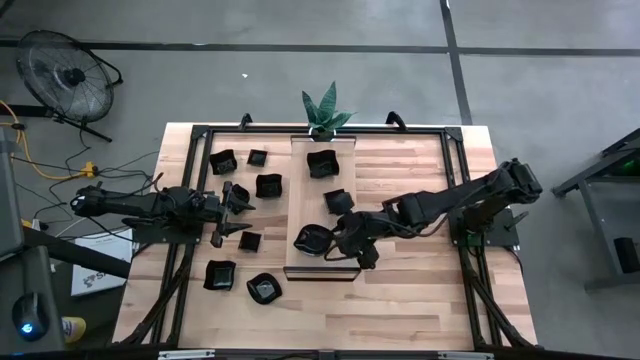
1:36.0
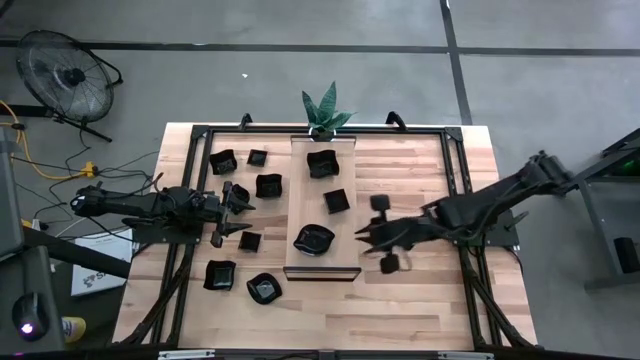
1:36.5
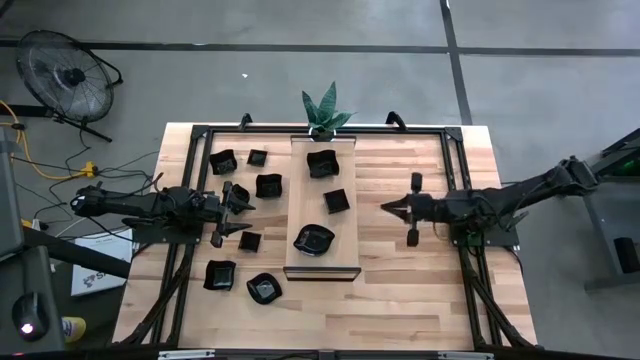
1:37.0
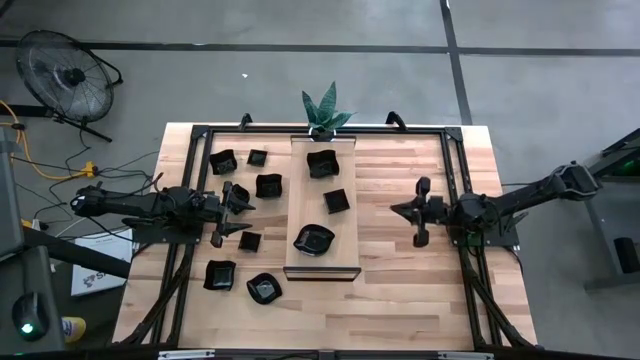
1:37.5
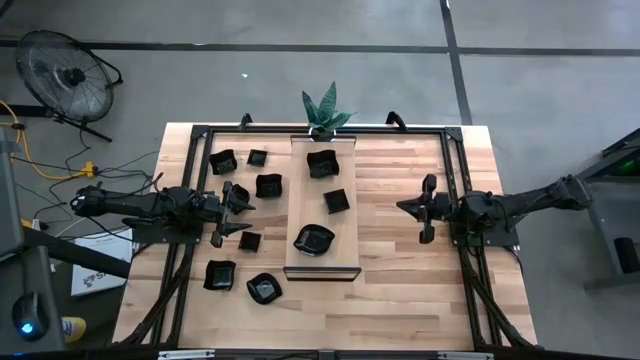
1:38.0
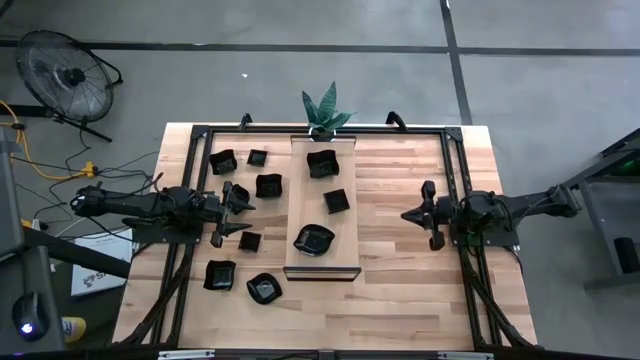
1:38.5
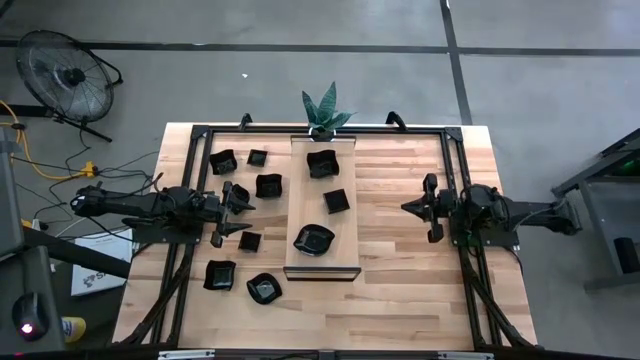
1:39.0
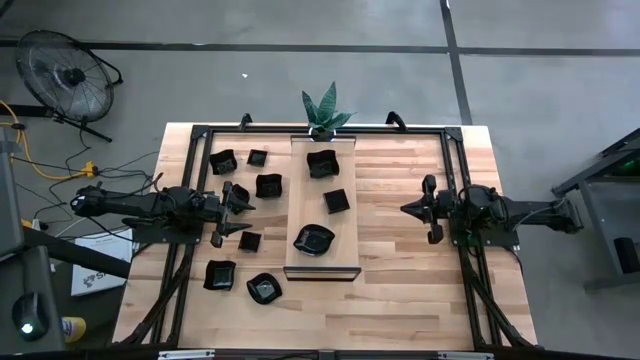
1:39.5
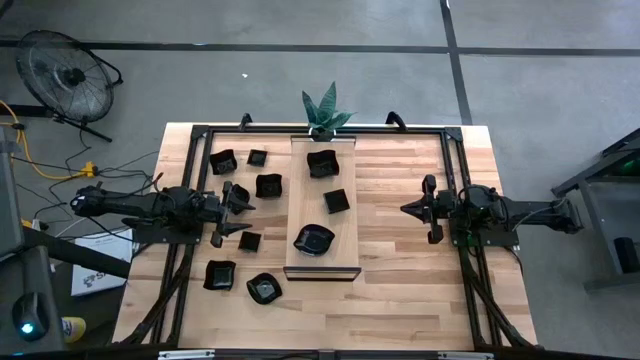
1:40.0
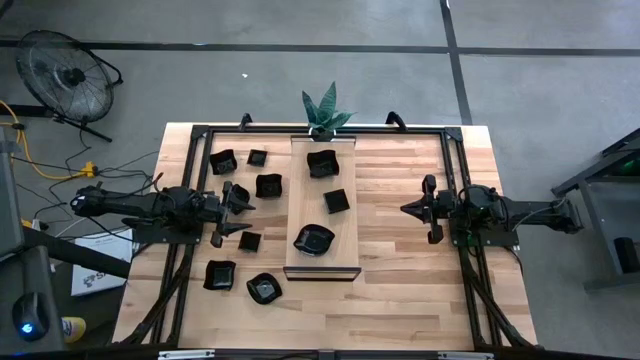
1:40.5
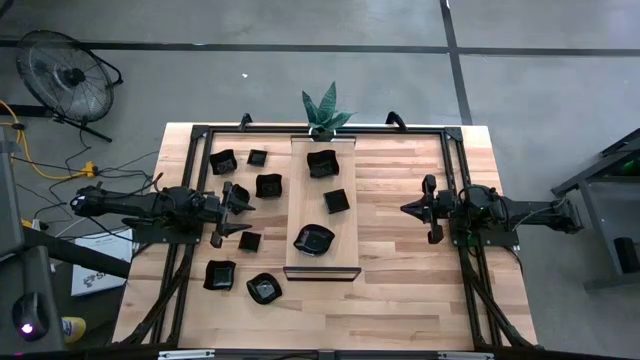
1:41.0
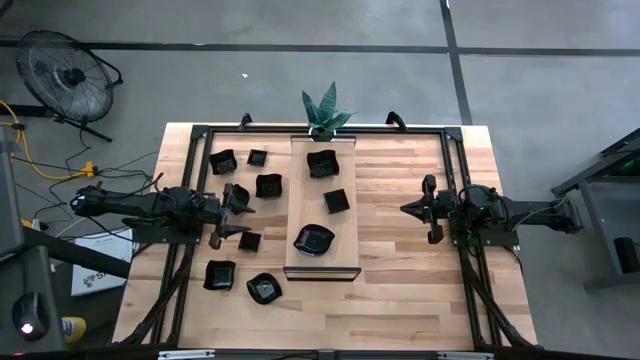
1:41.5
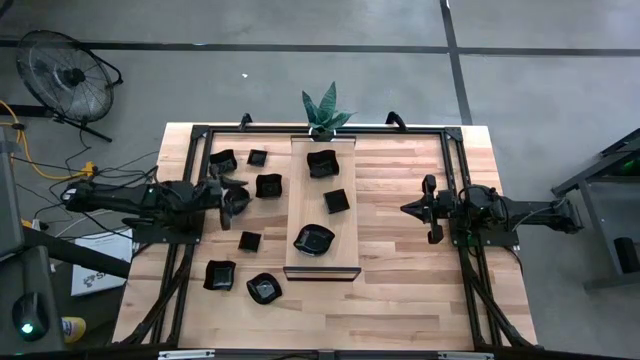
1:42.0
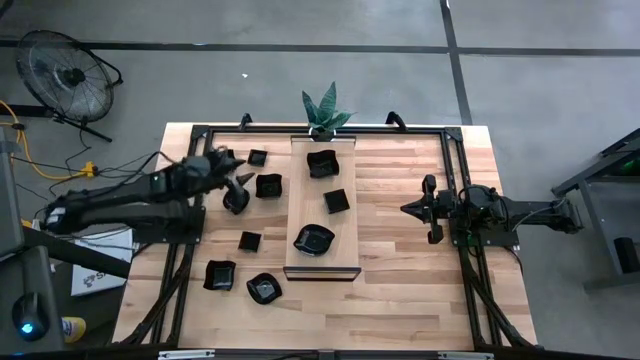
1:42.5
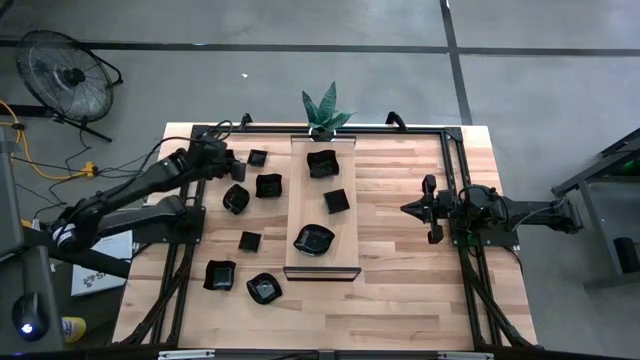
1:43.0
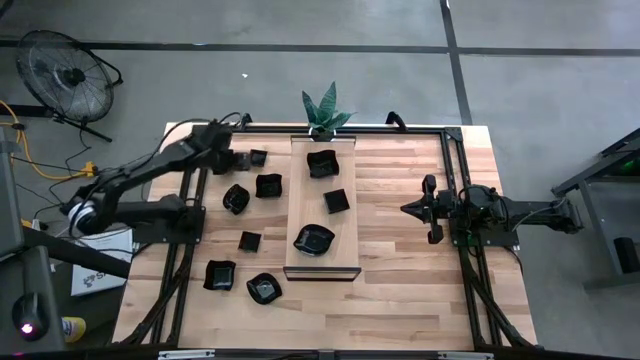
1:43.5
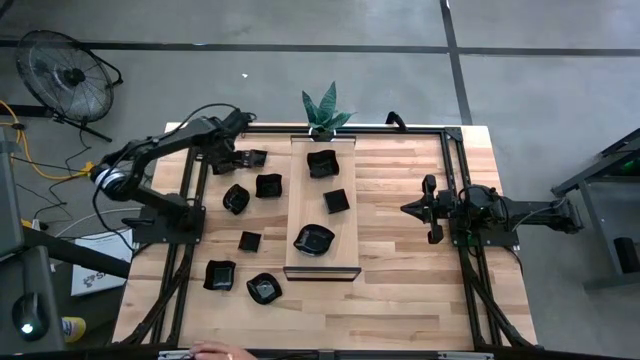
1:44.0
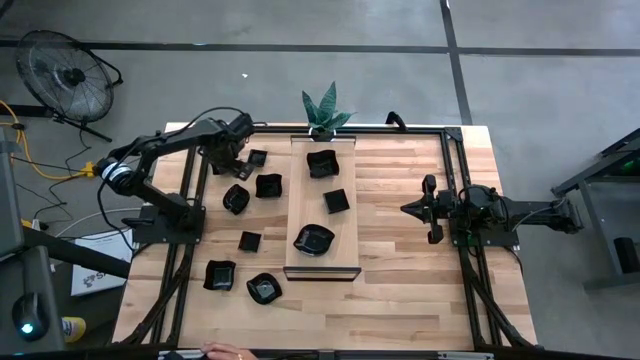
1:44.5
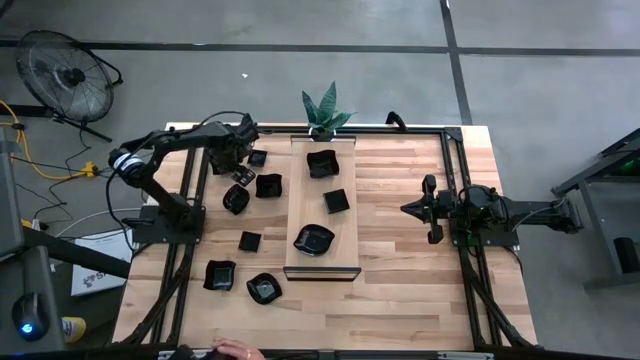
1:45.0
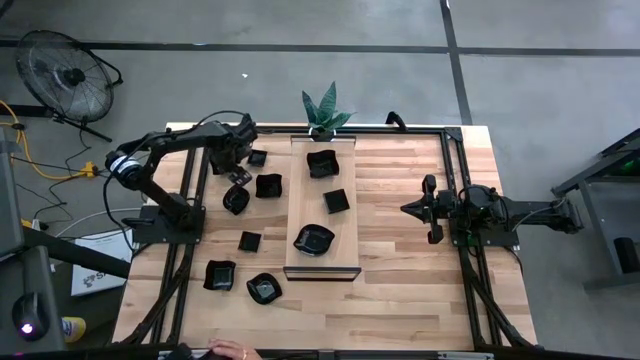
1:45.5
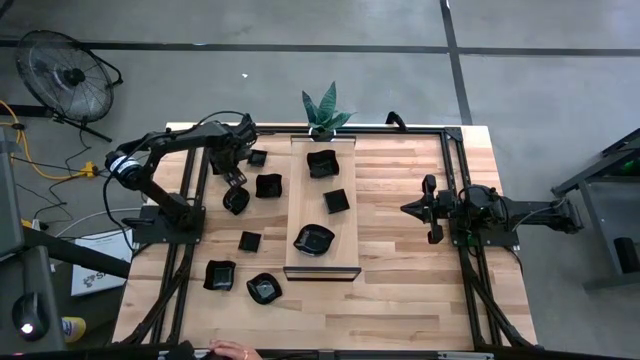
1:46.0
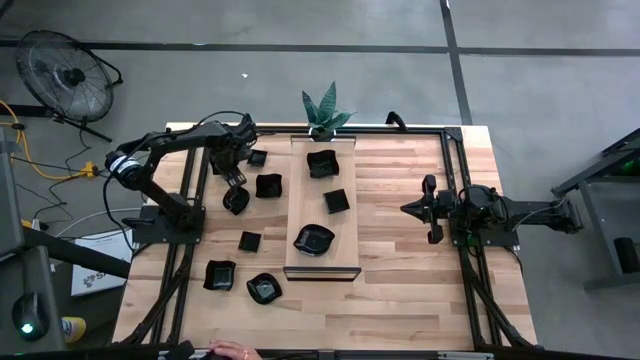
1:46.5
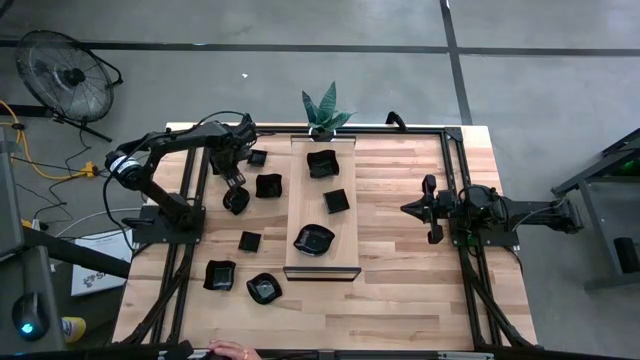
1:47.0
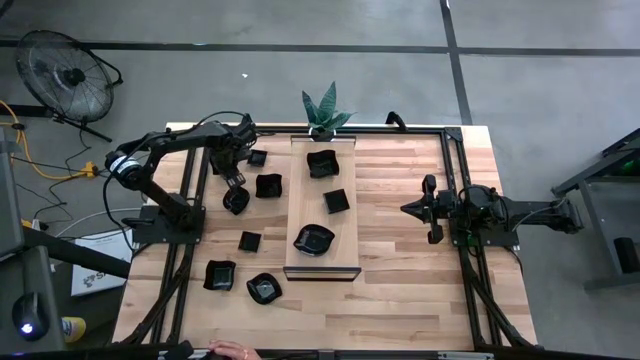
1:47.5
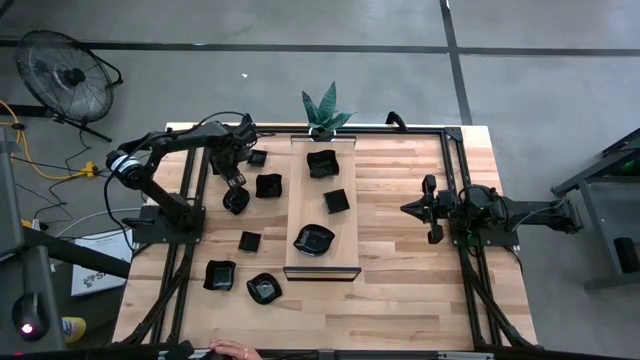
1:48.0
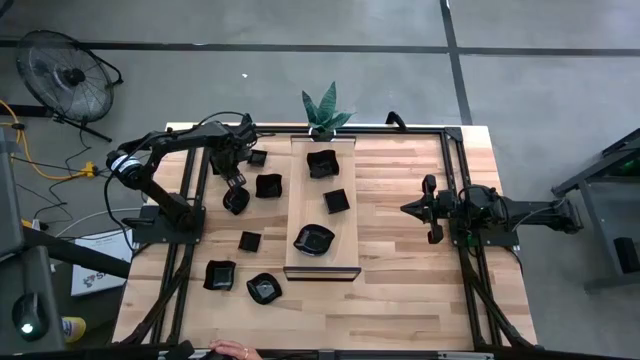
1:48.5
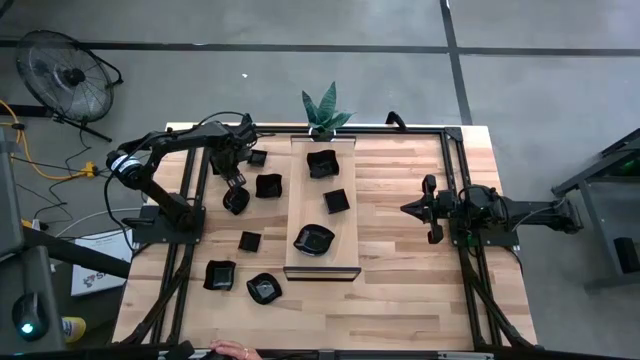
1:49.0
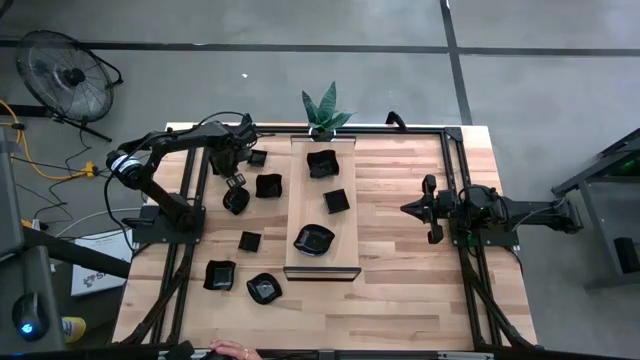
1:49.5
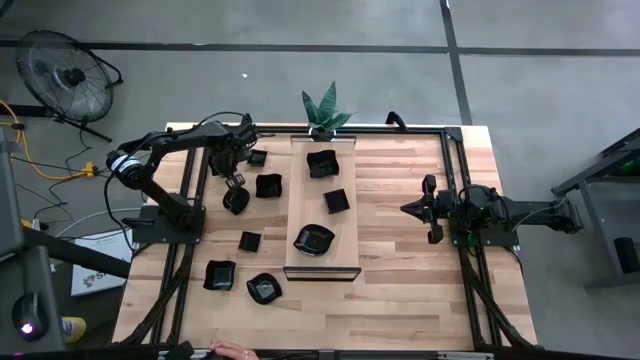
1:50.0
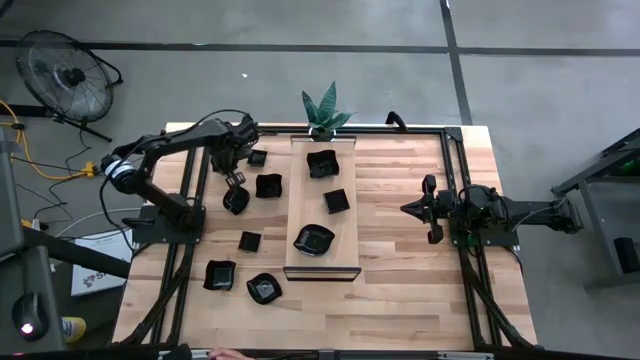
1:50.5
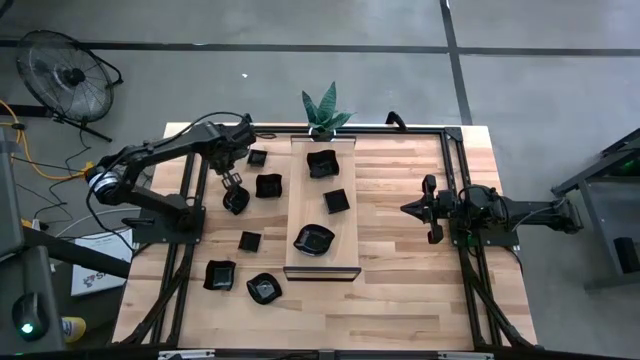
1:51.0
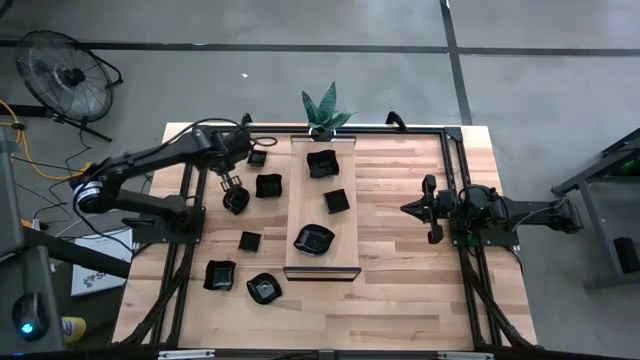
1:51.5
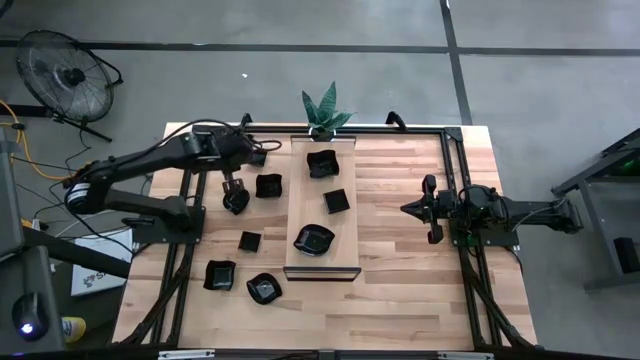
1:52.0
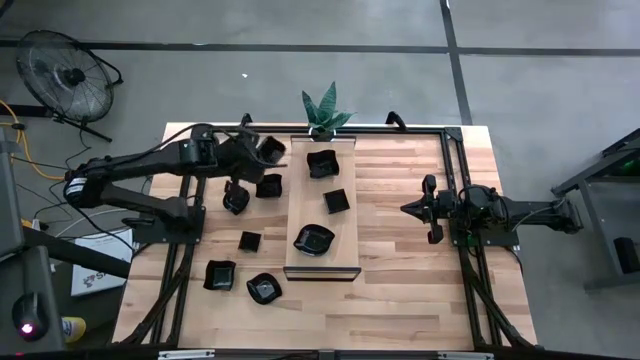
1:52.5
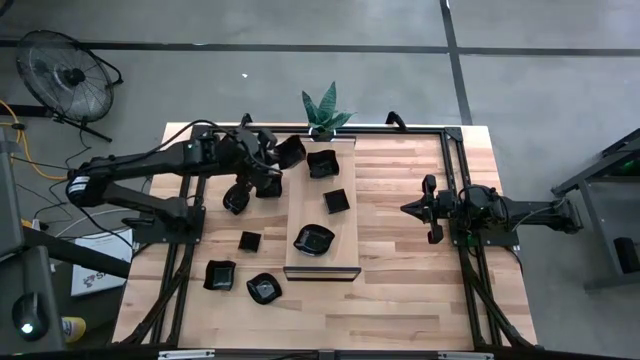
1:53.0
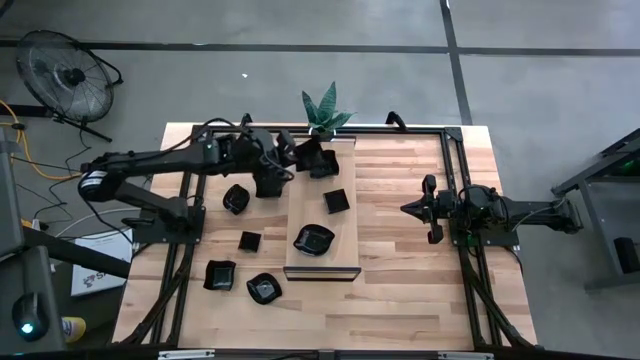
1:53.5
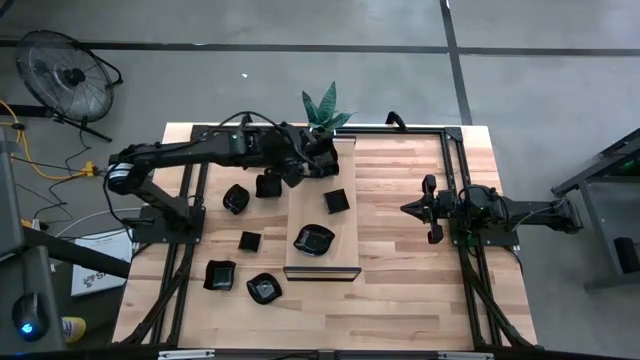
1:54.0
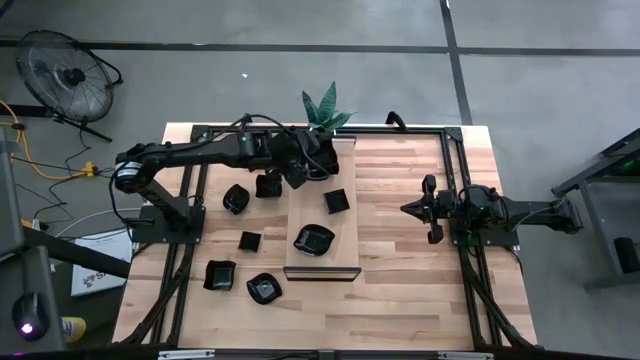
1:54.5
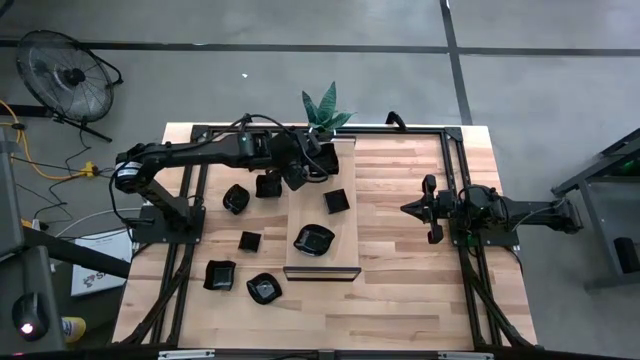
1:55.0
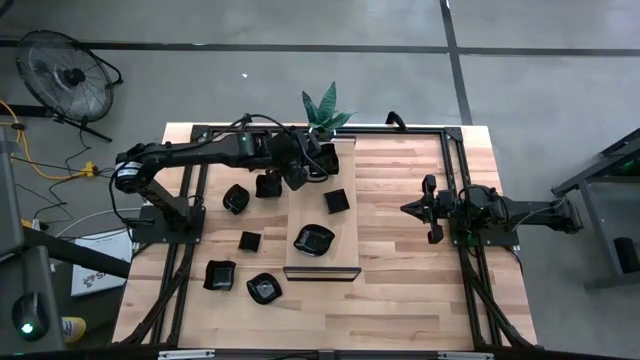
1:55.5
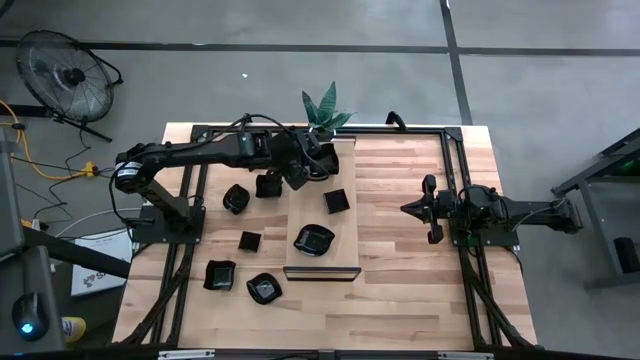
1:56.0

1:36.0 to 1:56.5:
Task: Pick & Place Mini shaped plates
Stack the black distorted square plate on top of the black distorted square plate on the shelf
